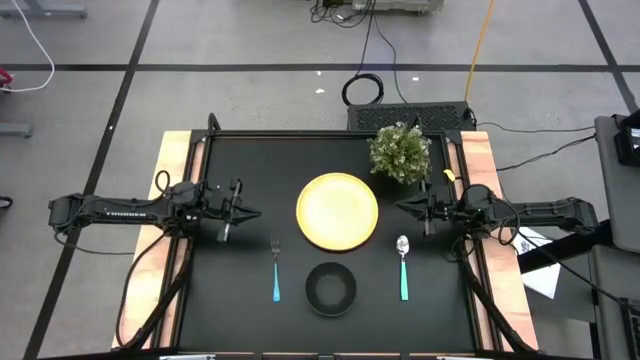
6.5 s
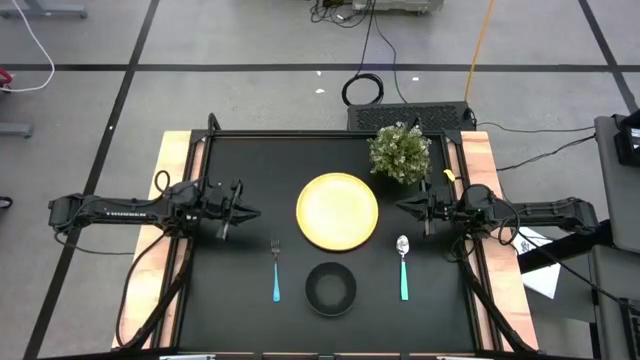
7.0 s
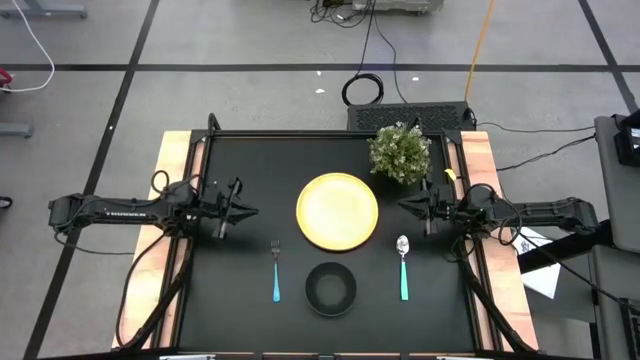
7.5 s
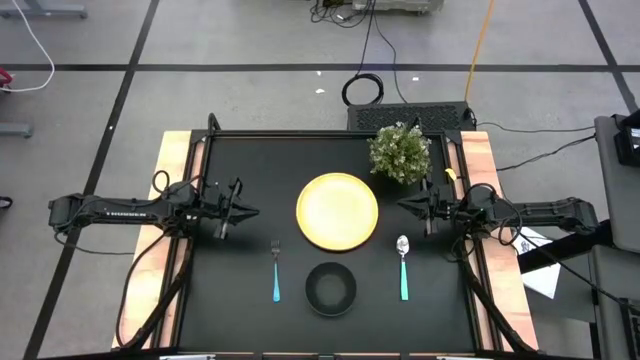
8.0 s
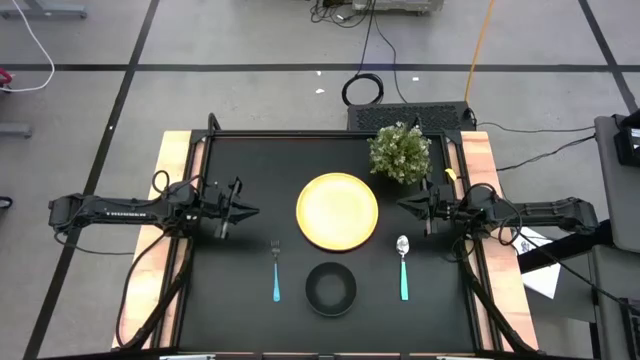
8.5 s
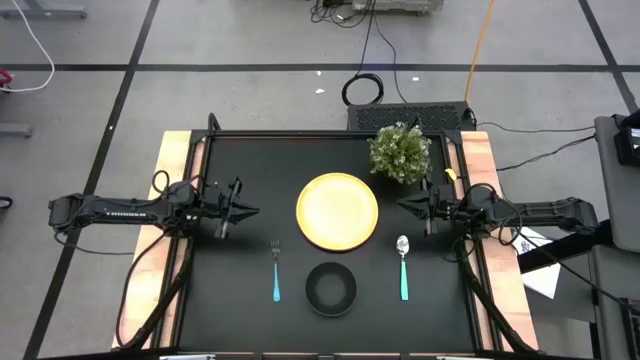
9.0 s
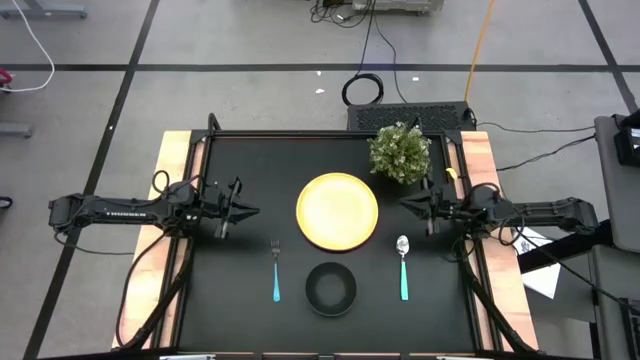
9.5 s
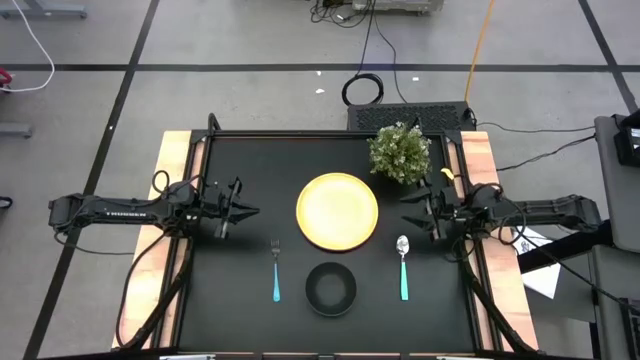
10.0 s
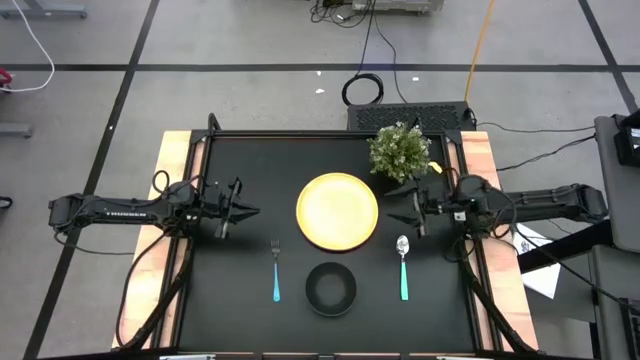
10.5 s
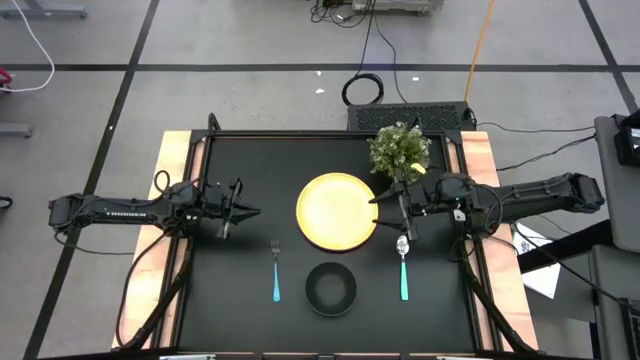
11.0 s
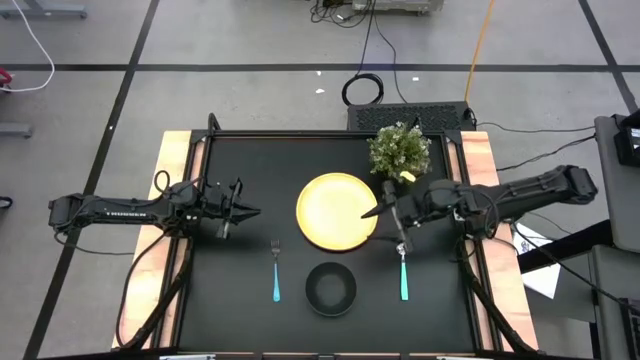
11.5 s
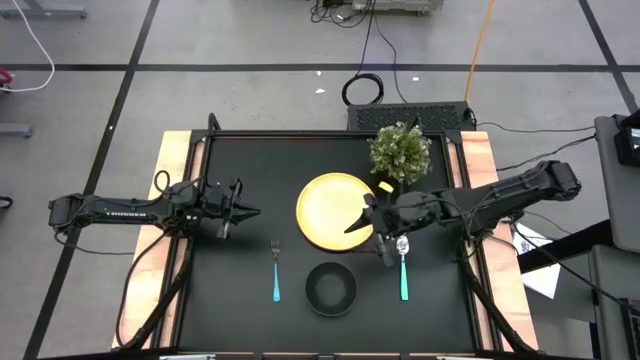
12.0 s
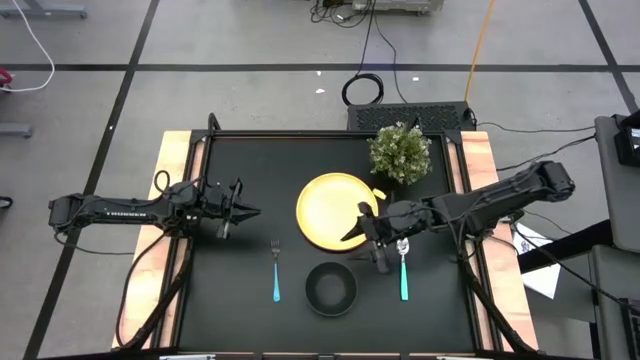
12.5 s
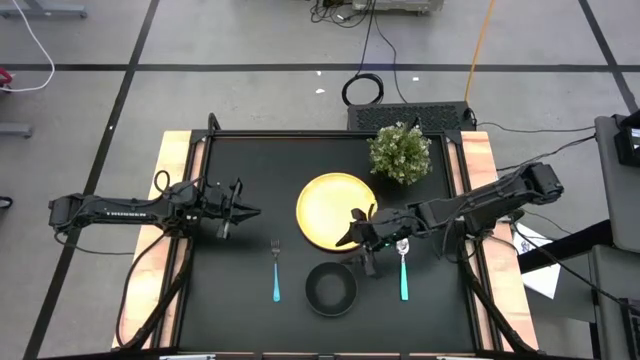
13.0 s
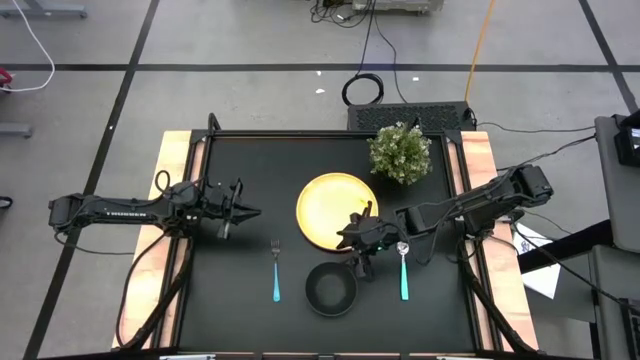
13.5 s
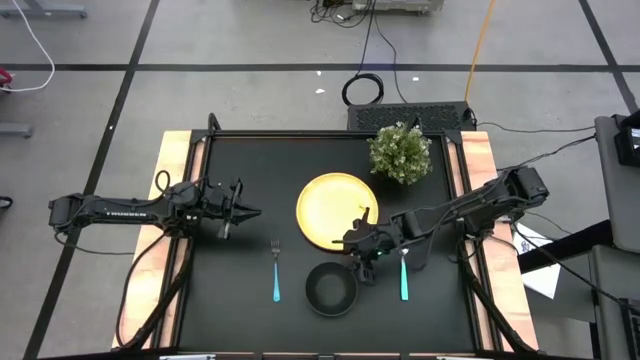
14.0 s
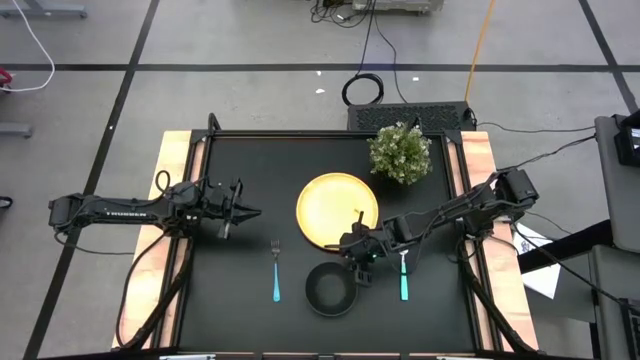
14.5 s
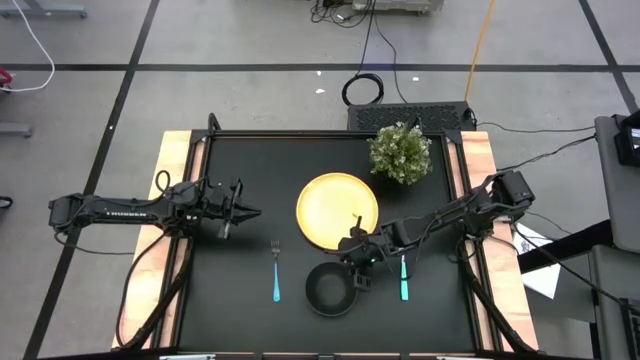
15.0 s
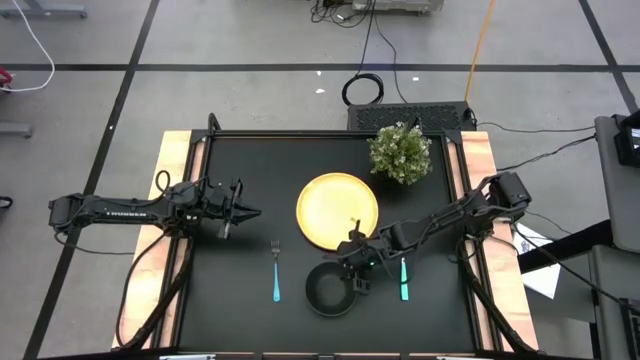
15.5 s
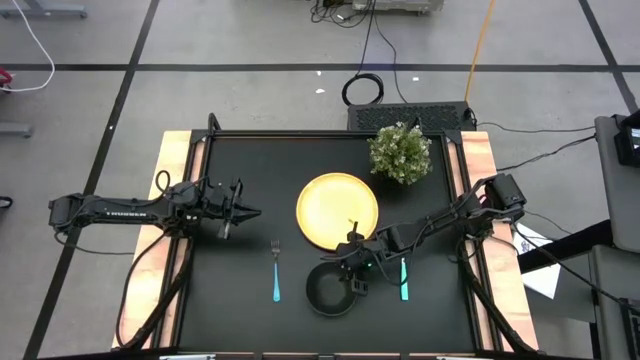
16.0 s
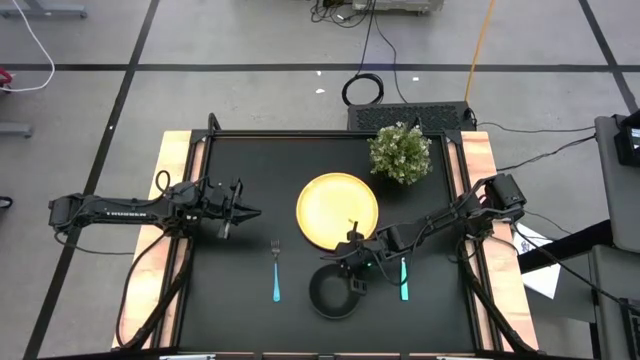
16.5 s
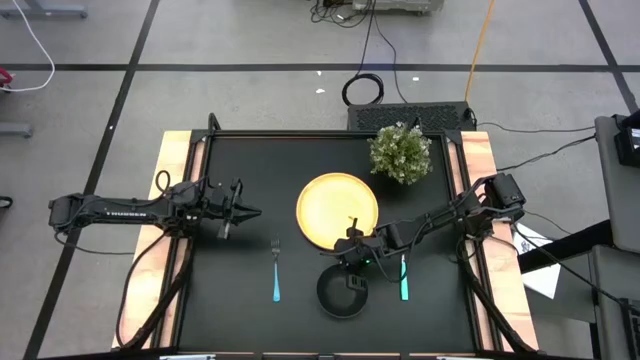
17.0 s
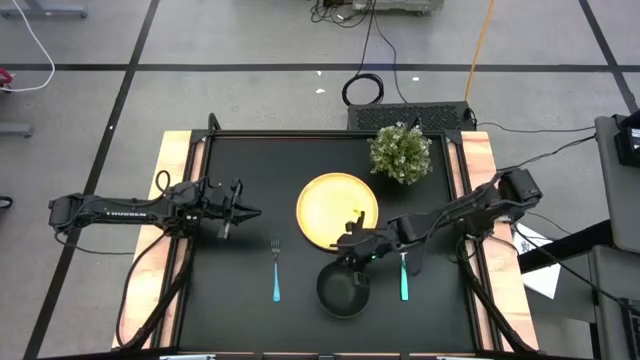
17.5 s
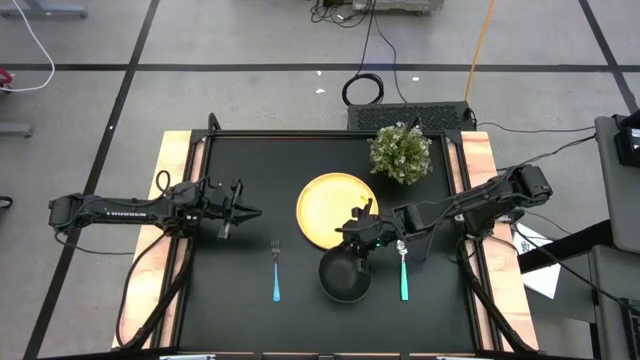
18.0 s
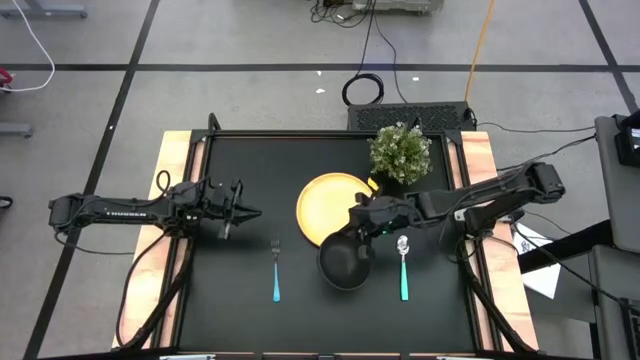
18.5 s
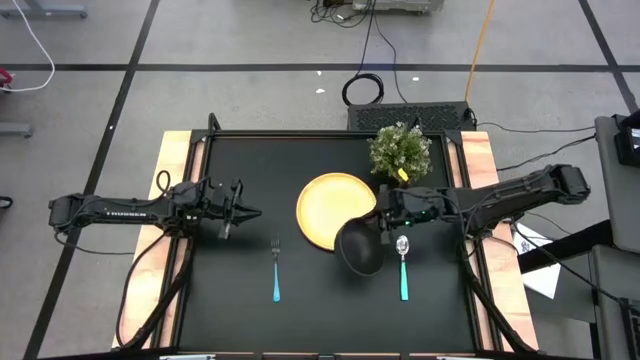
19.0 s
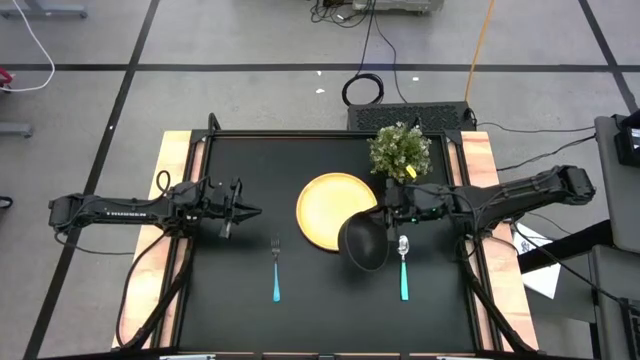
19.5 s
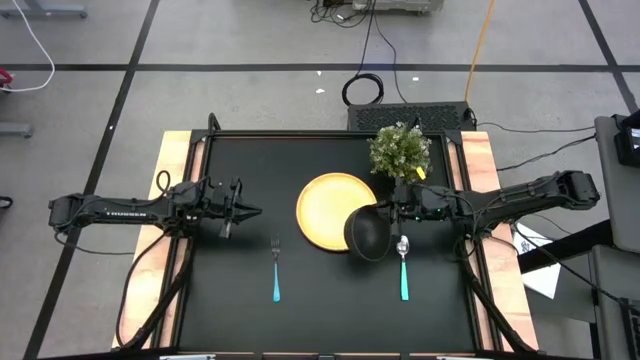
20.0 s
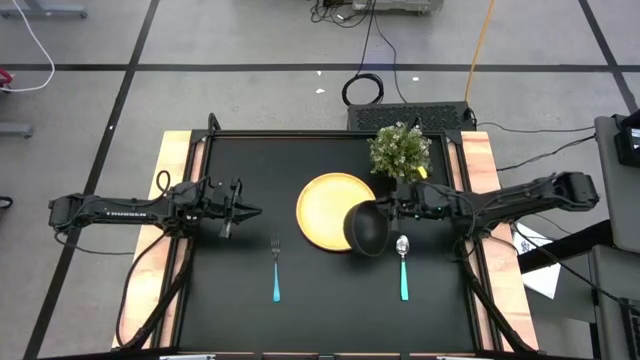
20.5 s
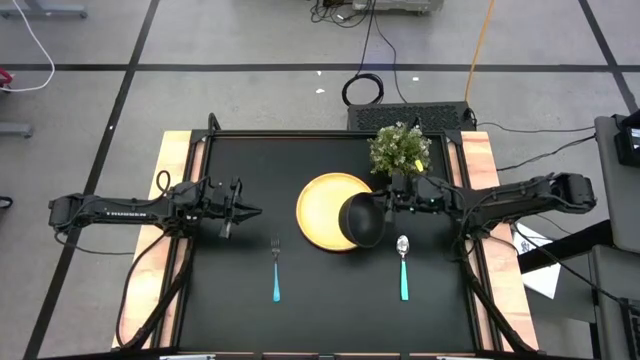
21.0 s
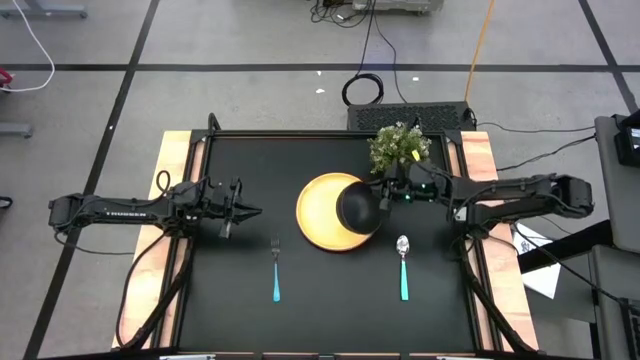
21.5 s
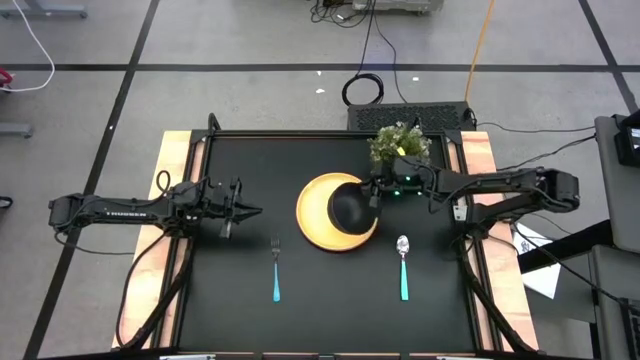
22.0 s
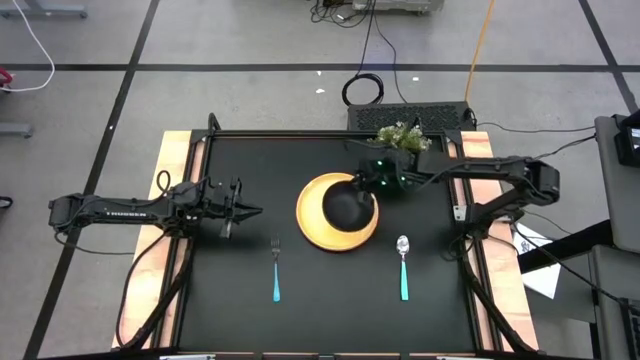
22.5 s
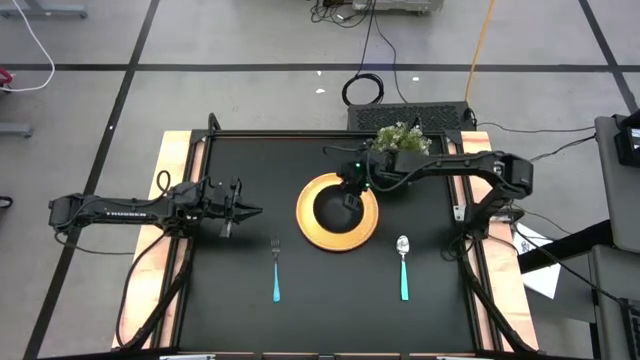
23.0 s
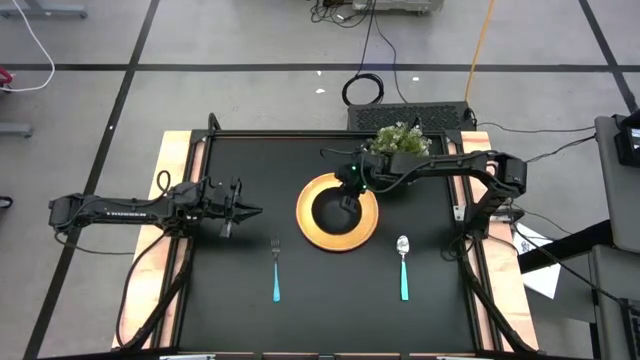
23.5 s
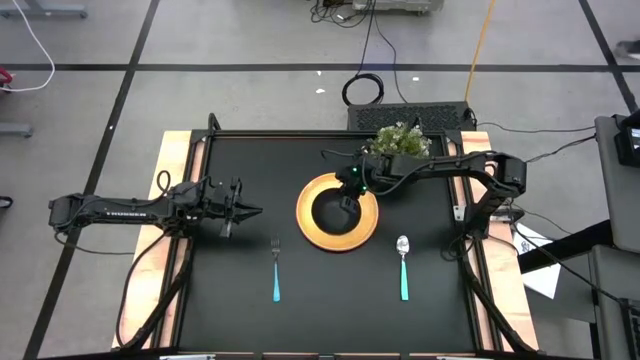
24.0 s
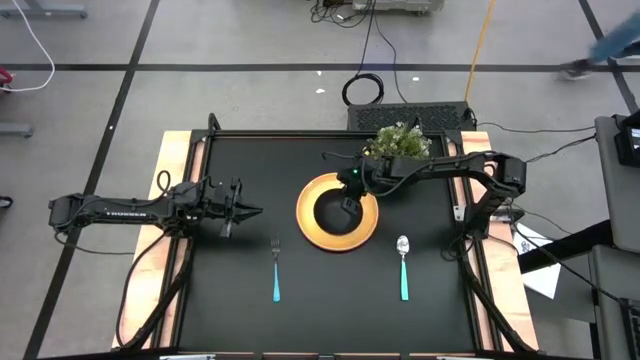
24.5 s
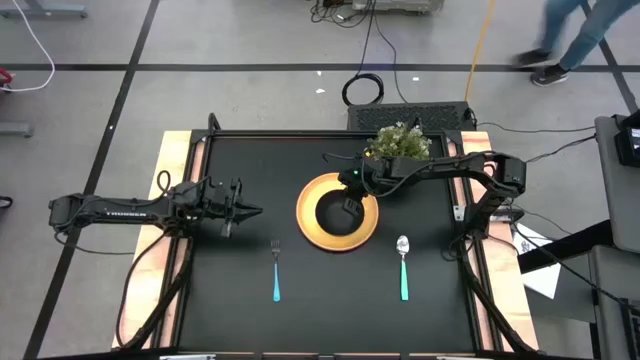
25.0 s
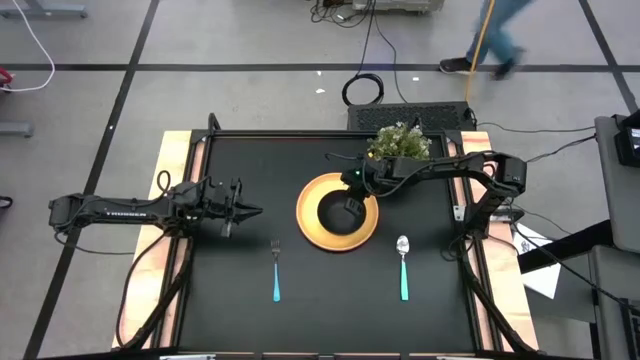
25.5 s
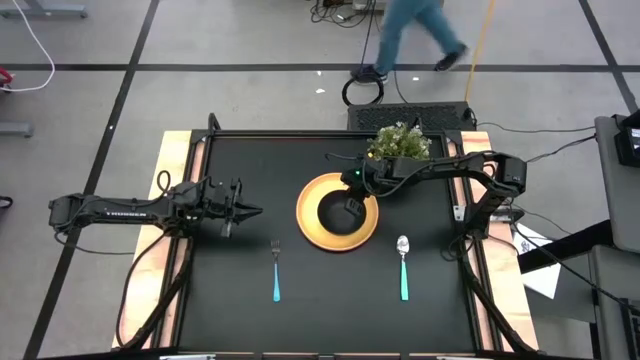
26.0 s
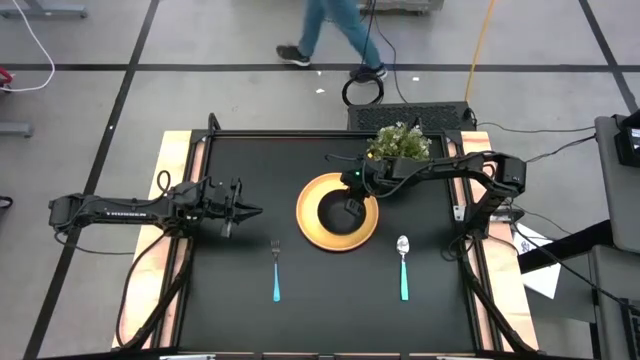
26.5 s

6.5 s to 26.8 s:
Task: Set table place
Put the black bowl on the yellow plate
